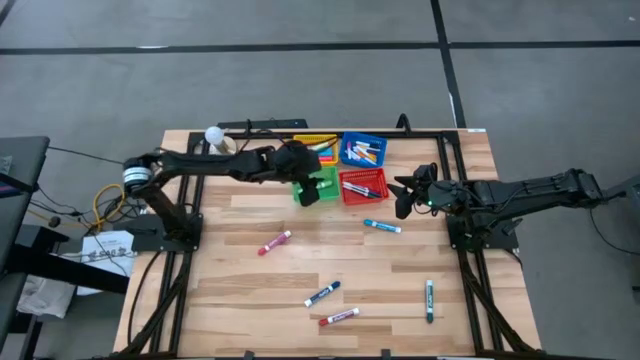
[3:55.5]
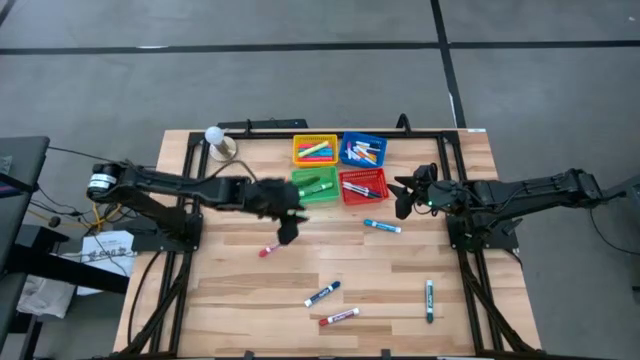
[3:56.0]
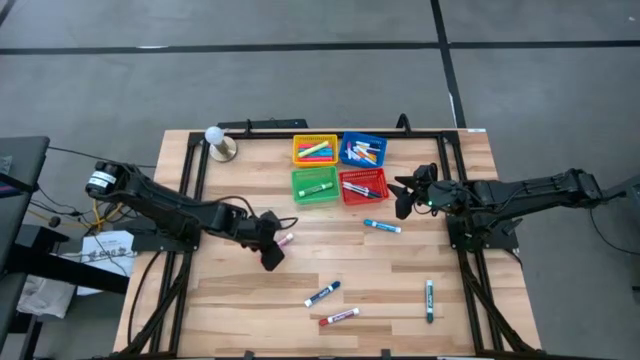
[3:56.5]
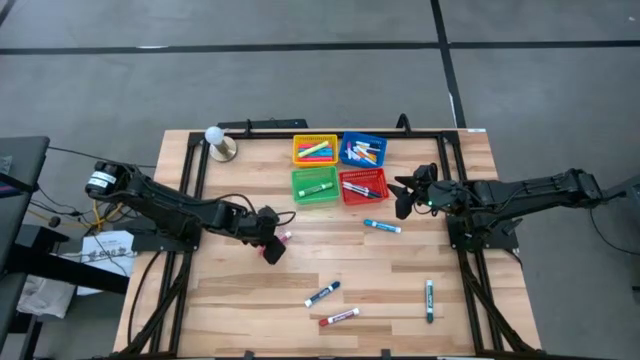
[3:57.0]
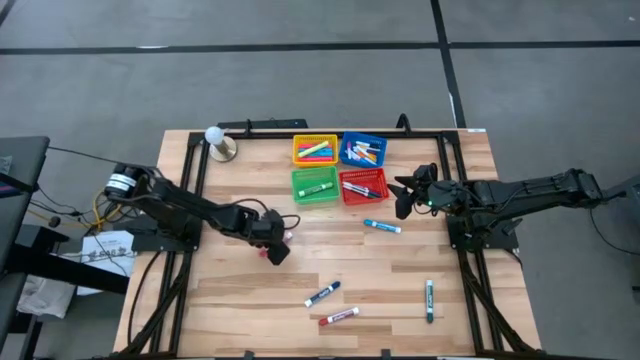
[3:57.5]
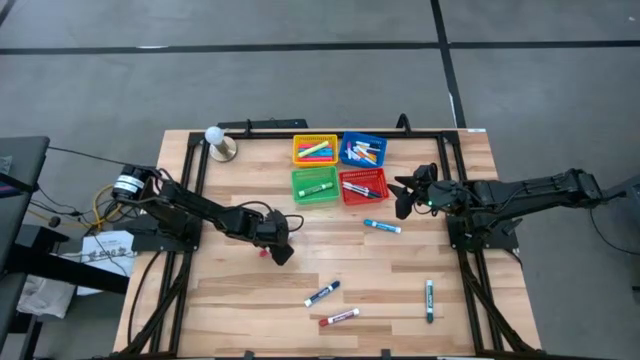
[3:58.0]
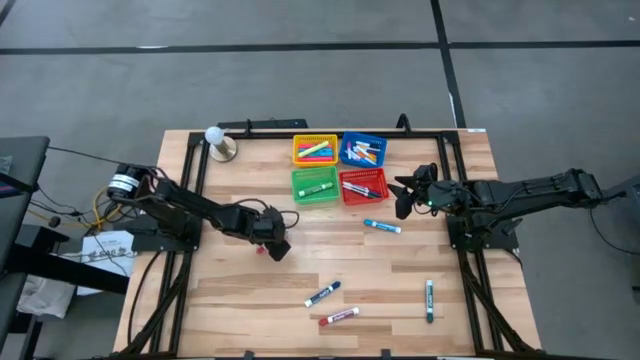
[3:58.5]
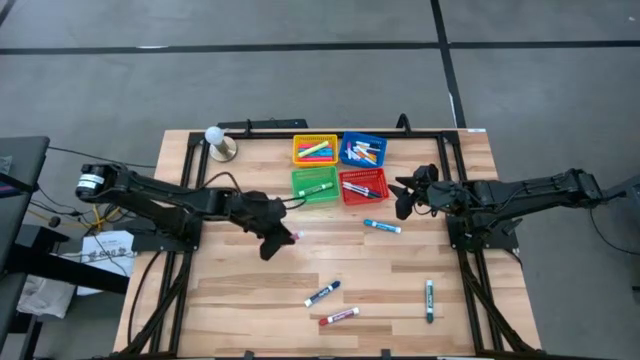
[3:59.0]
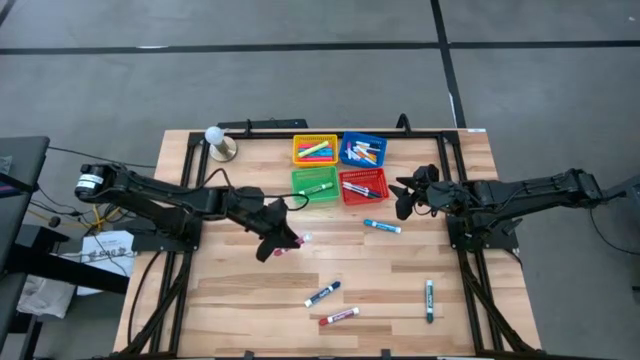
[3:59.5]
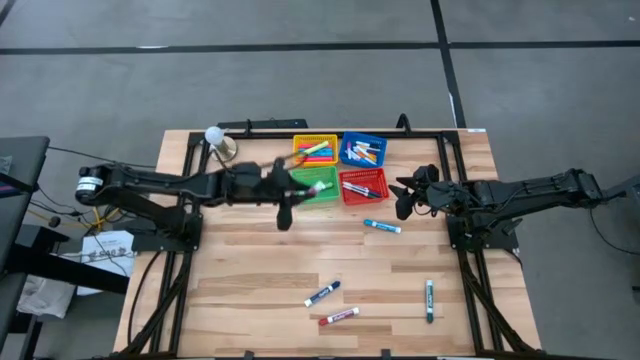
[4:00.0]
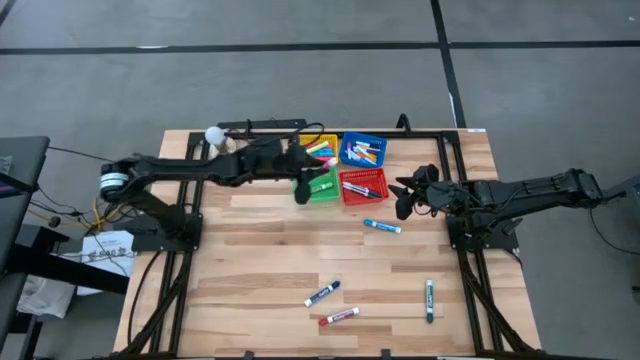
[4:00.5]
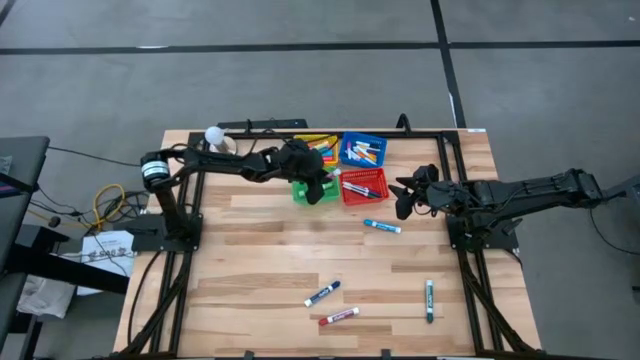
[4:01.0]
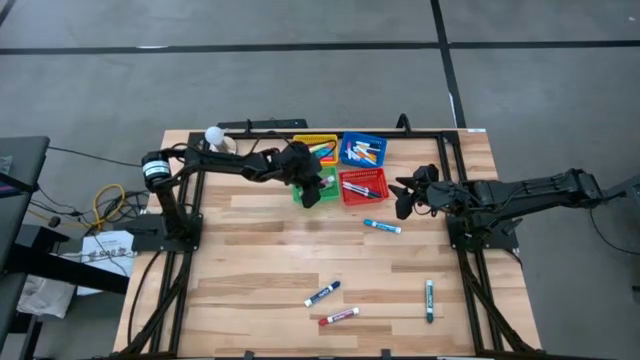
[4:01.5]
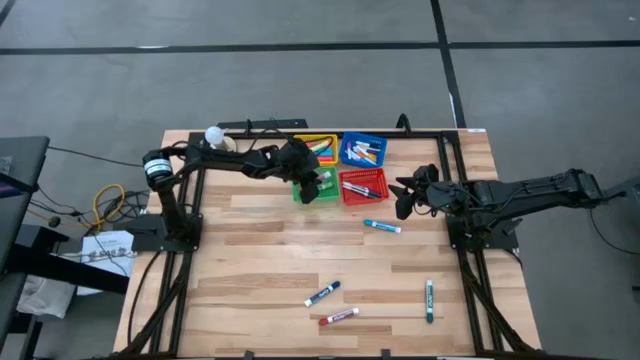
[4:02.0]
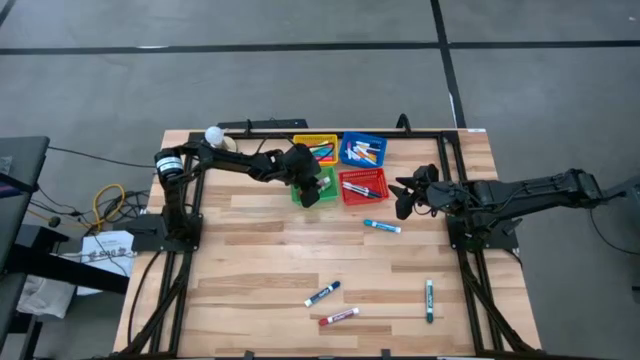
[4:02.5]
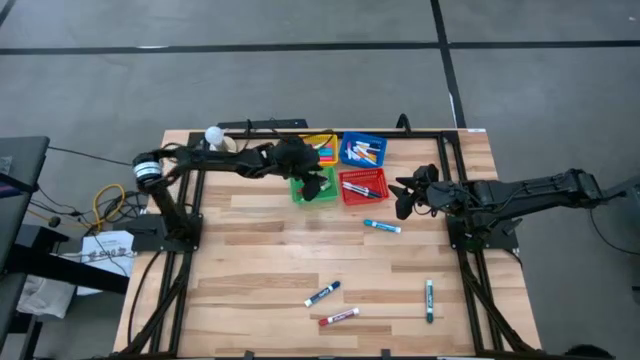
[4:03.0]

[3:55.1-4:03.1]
Task: Pick & Place Markers
Put the pink dry erase marker into the green bin

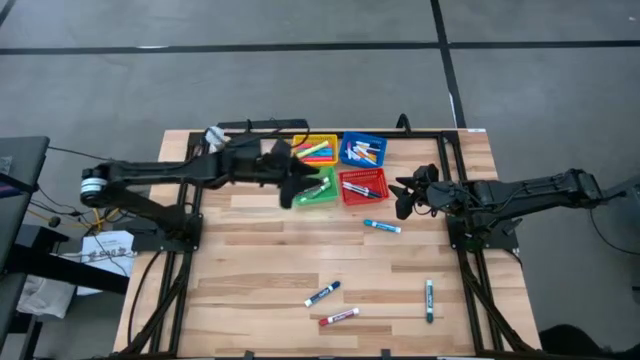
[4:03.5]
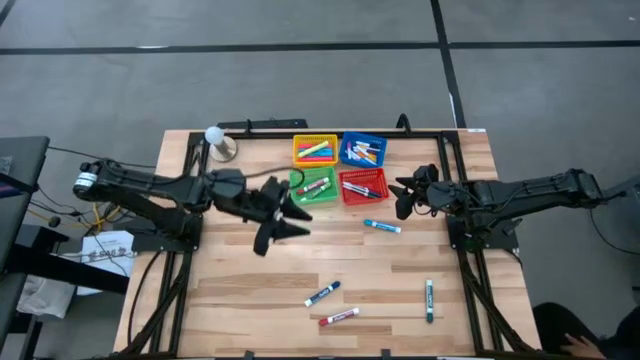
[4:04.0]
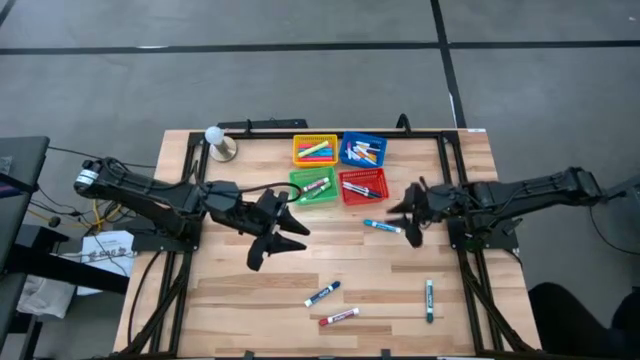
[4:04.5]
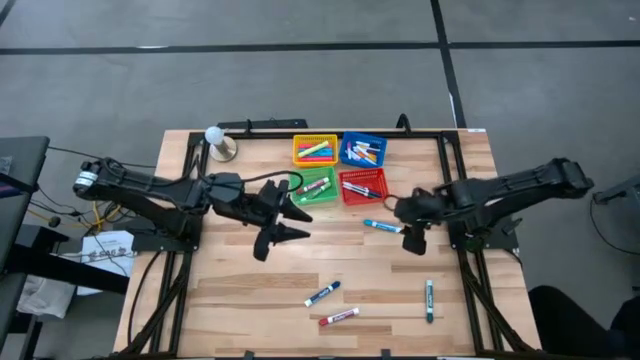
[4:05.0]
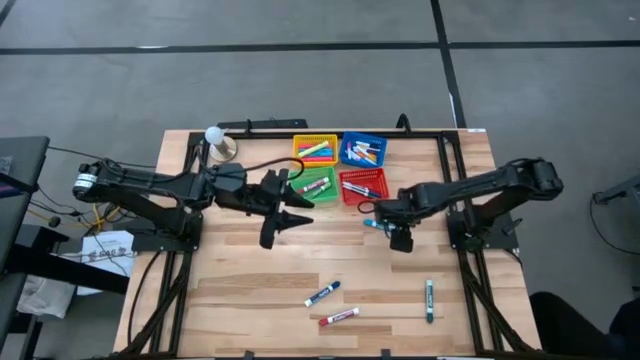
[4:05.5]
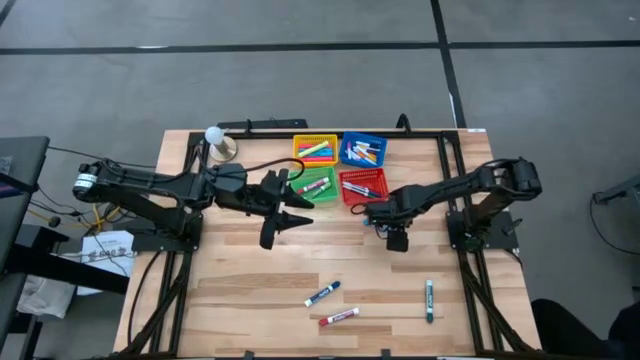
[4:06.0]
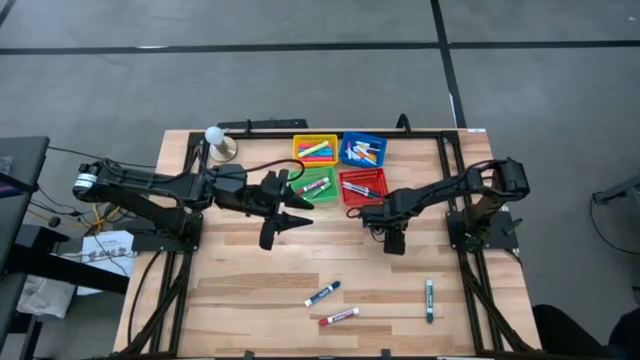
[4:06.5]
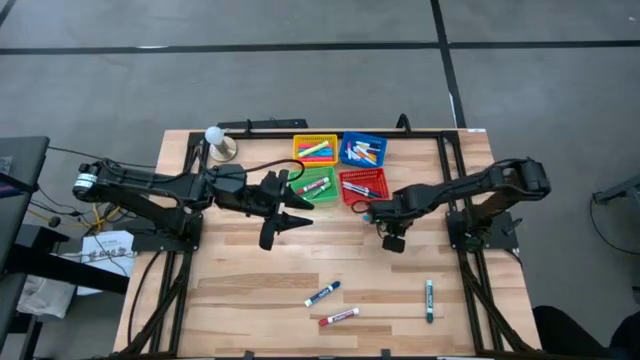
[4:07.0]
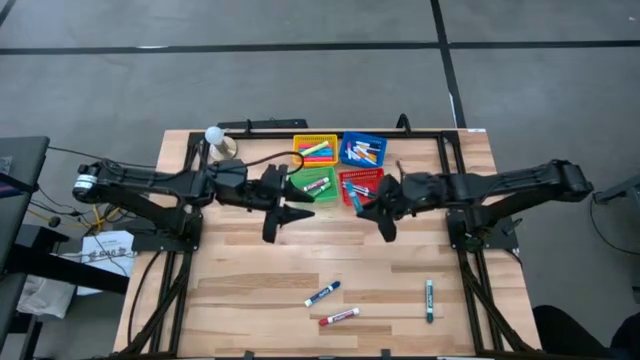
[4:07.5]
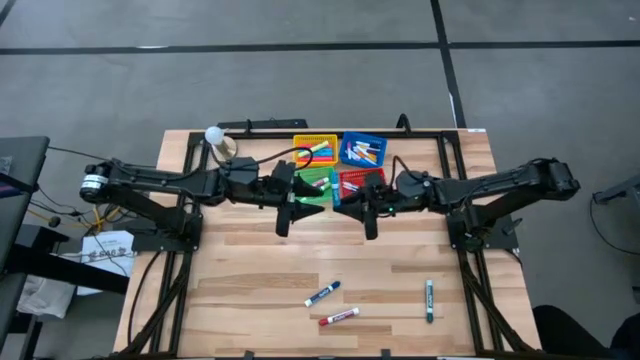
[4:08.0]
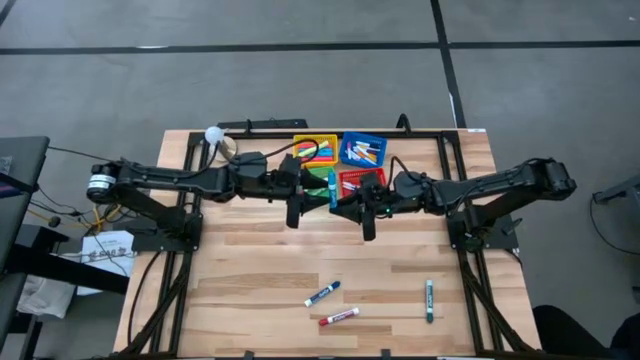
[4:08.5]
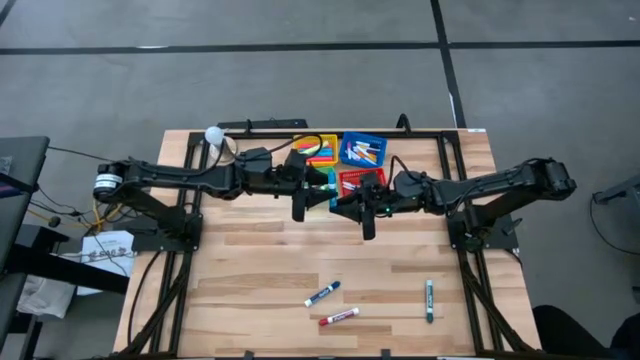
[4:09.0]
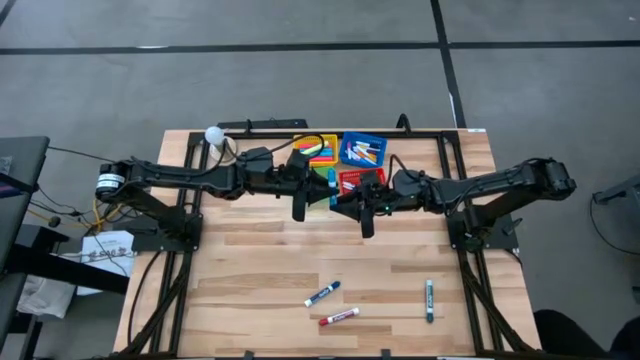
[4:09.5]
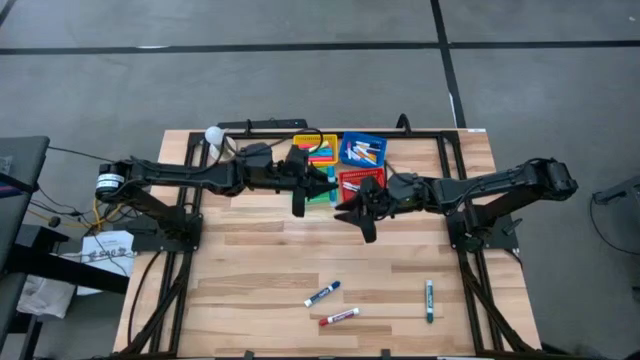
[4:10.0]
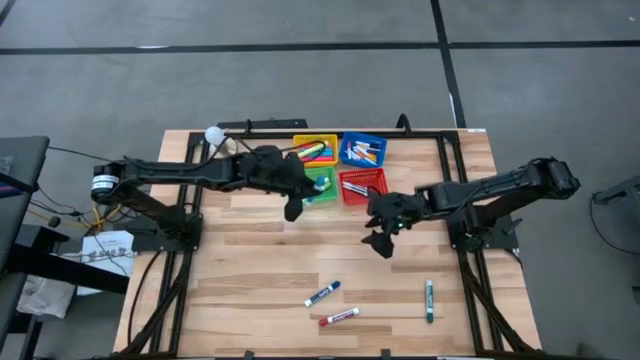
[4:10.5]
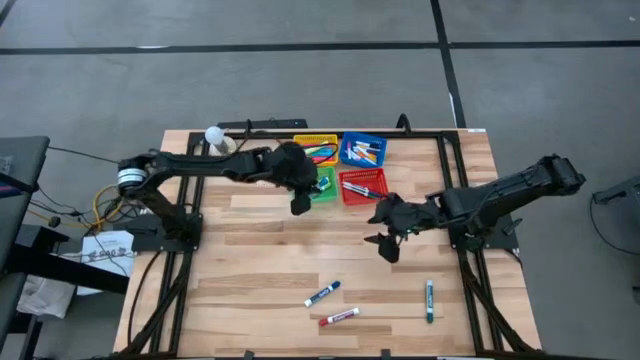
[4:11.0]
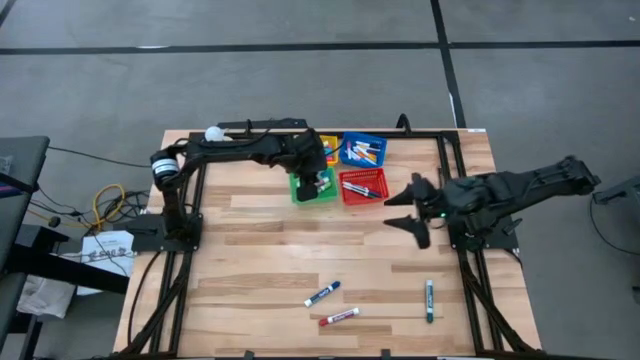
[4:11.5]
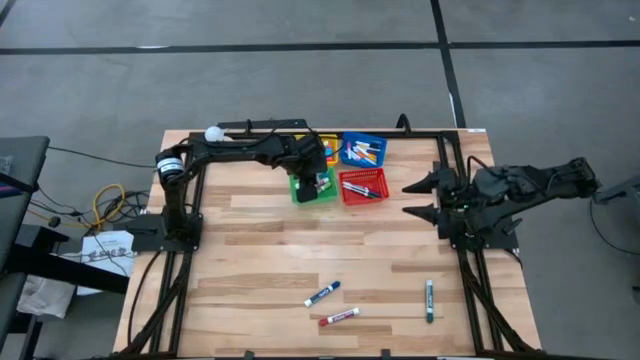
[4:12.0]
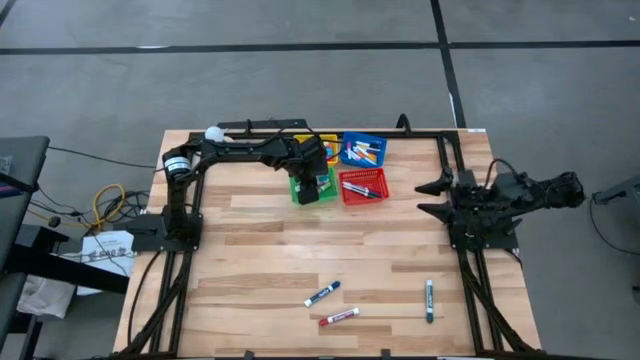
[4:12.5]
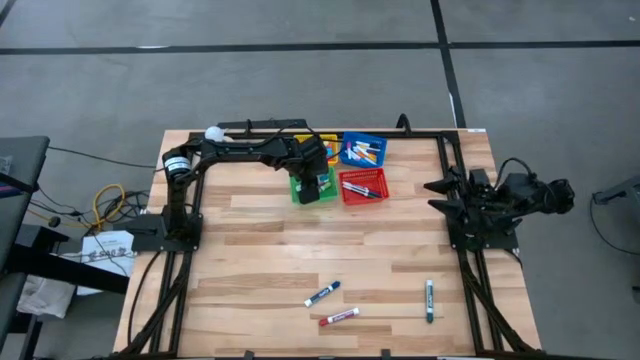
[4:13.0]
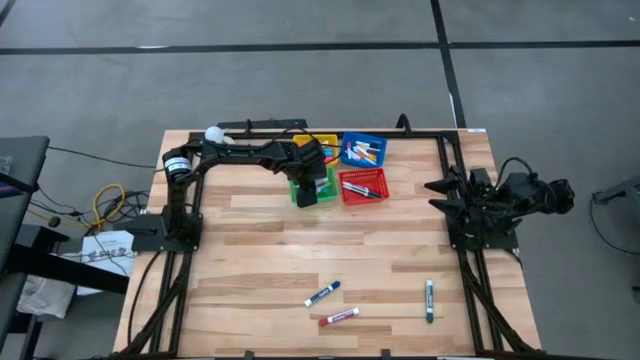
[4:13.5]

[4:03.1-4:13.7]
Put the light blue dry erase marker into the green bin
